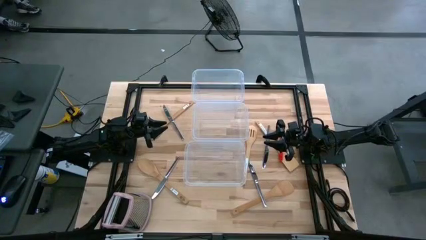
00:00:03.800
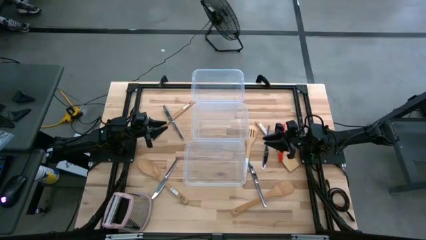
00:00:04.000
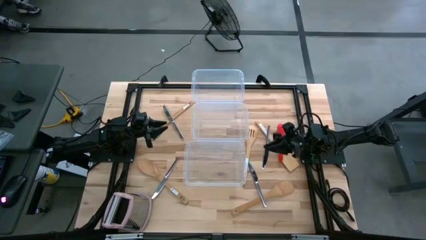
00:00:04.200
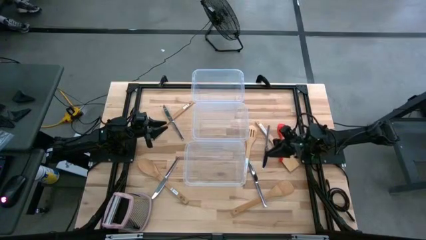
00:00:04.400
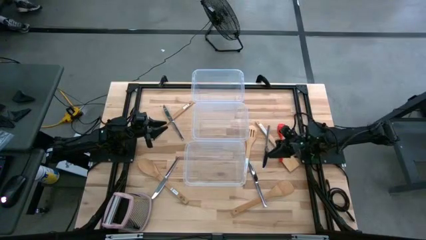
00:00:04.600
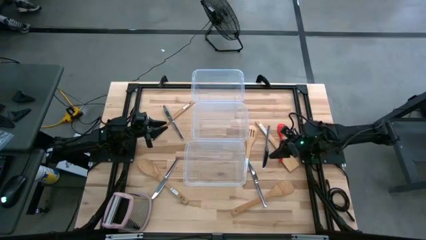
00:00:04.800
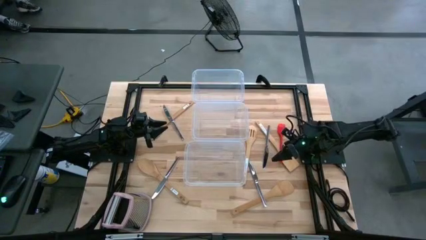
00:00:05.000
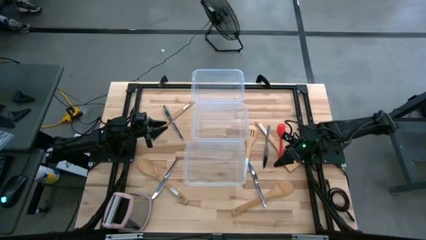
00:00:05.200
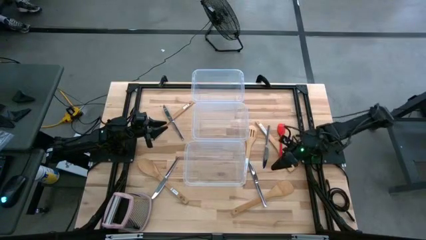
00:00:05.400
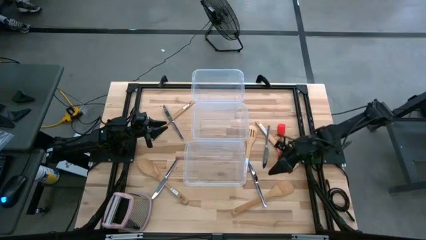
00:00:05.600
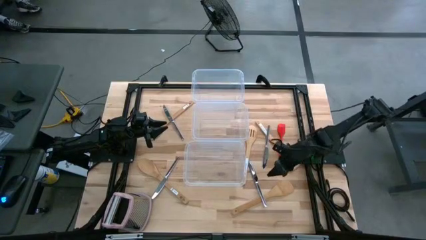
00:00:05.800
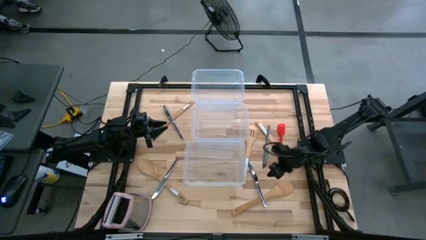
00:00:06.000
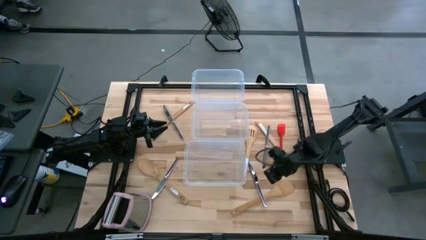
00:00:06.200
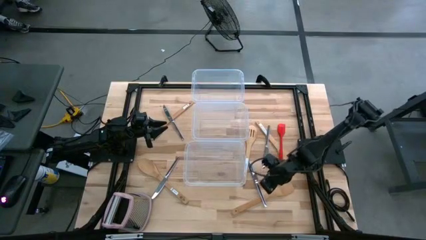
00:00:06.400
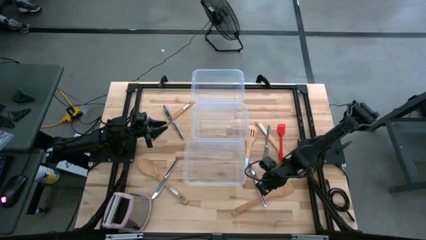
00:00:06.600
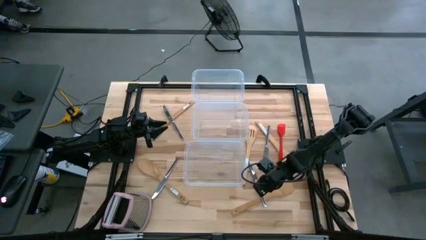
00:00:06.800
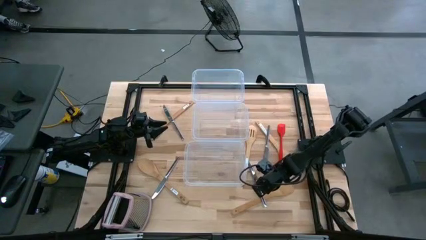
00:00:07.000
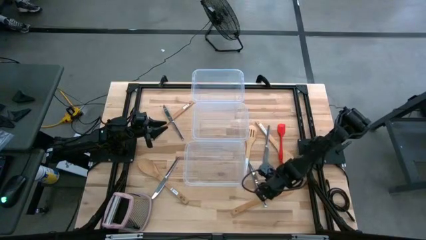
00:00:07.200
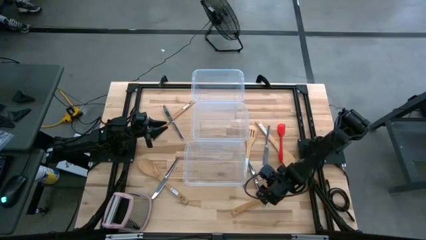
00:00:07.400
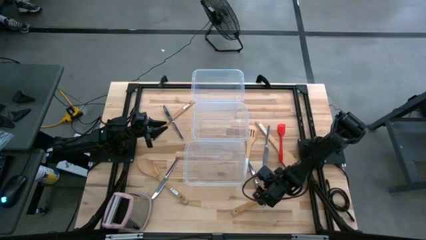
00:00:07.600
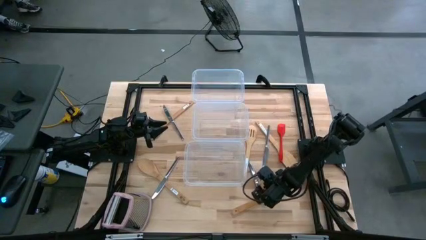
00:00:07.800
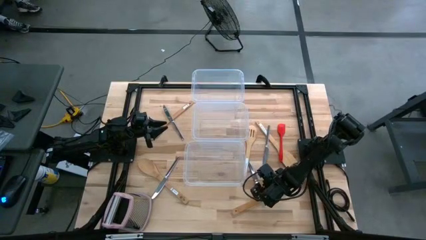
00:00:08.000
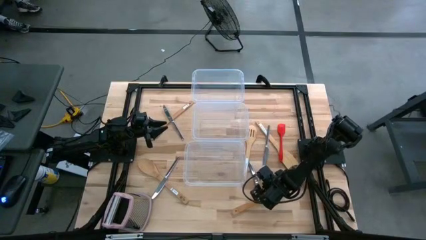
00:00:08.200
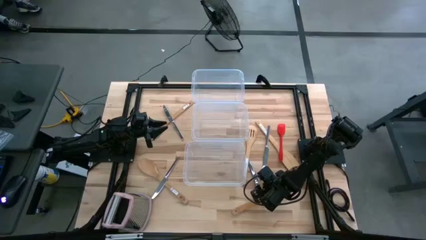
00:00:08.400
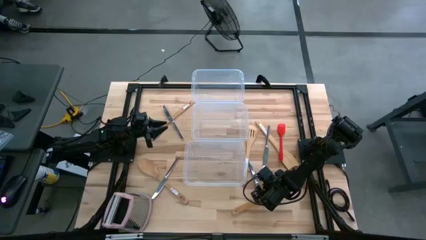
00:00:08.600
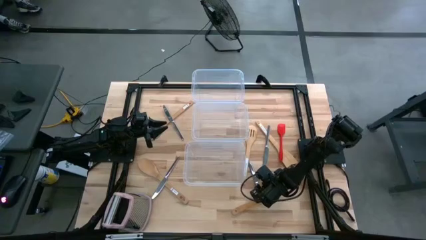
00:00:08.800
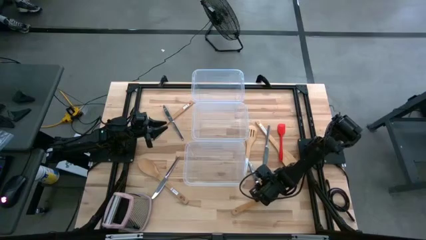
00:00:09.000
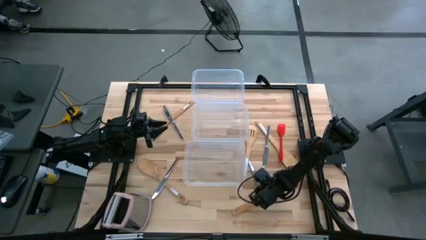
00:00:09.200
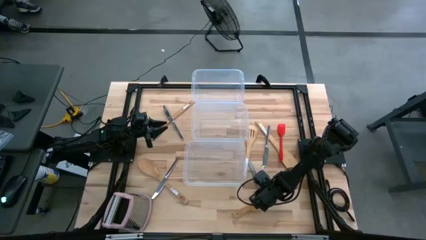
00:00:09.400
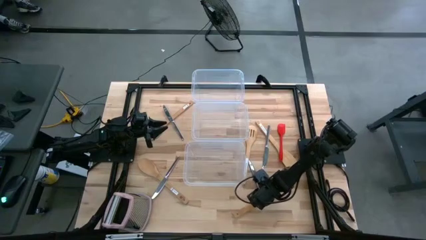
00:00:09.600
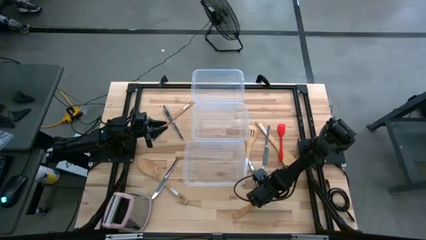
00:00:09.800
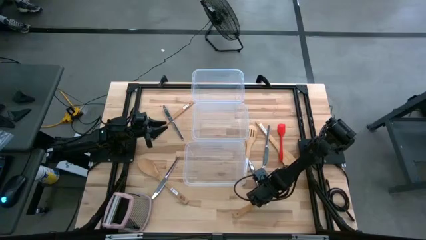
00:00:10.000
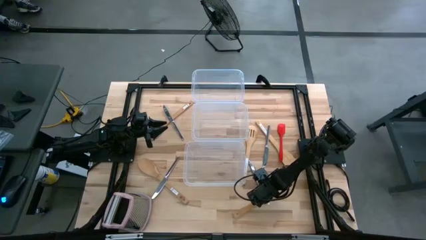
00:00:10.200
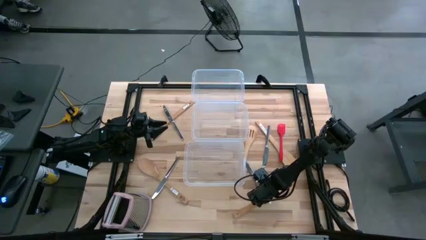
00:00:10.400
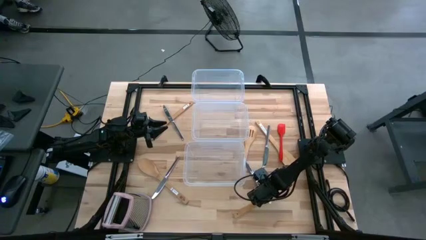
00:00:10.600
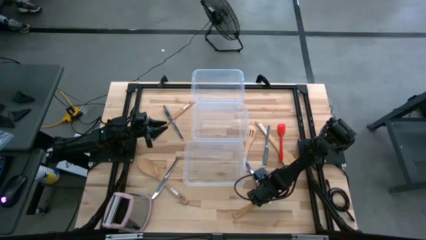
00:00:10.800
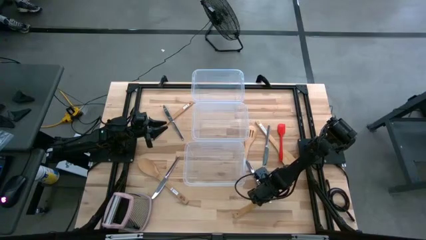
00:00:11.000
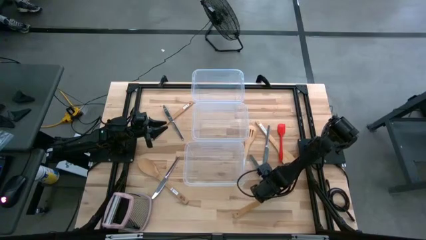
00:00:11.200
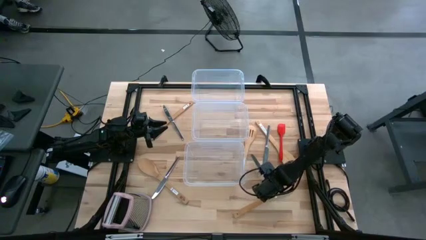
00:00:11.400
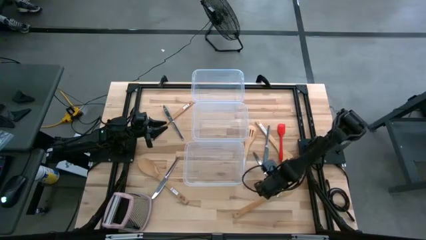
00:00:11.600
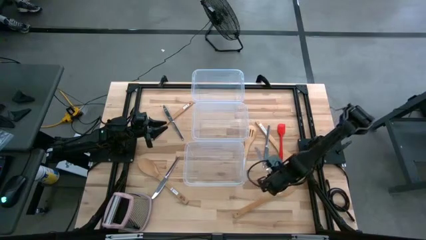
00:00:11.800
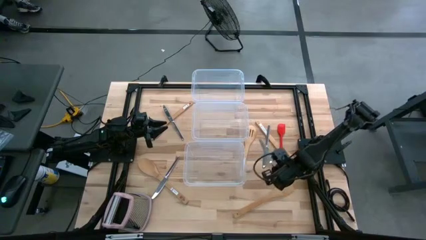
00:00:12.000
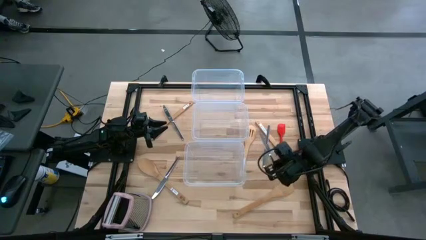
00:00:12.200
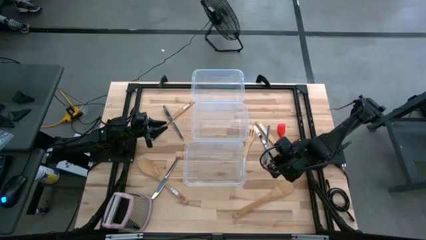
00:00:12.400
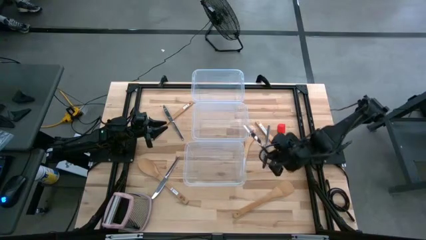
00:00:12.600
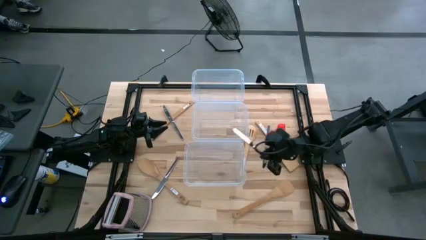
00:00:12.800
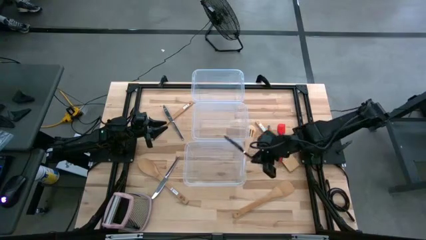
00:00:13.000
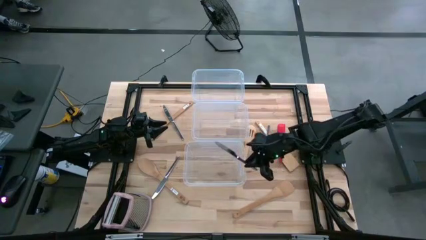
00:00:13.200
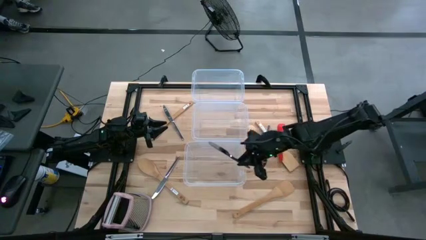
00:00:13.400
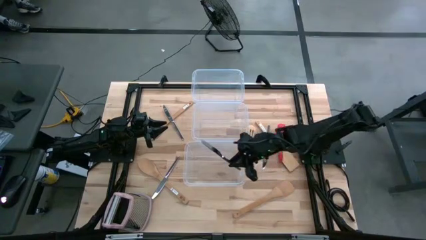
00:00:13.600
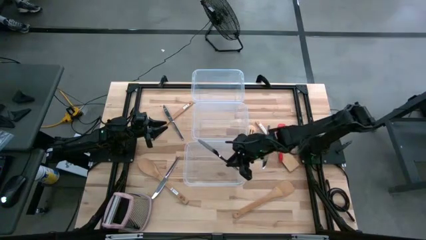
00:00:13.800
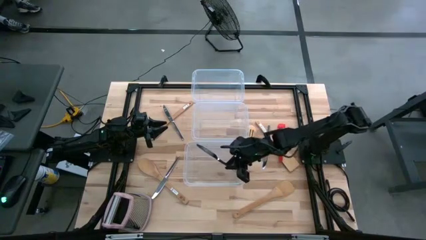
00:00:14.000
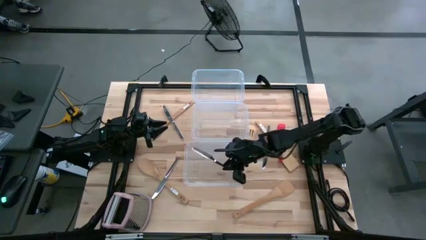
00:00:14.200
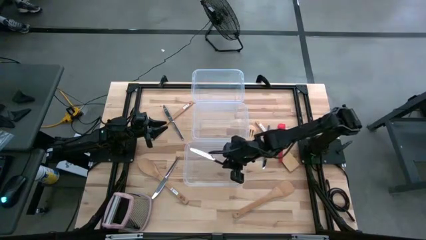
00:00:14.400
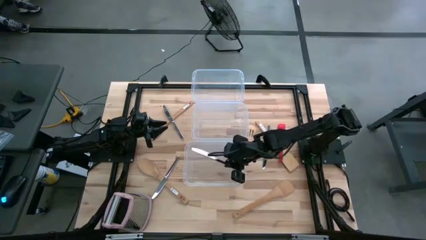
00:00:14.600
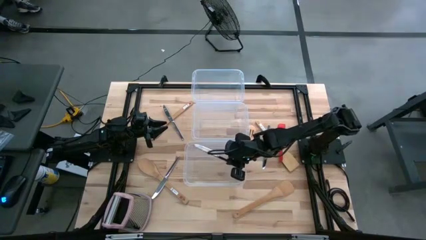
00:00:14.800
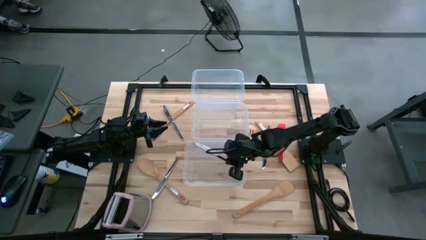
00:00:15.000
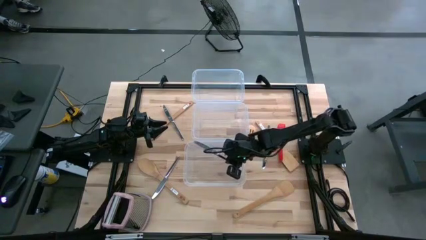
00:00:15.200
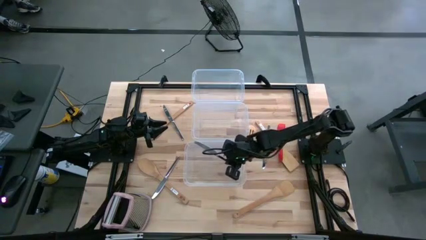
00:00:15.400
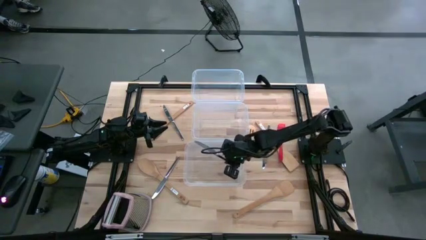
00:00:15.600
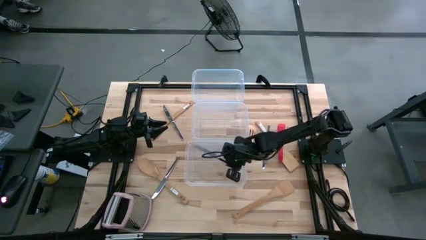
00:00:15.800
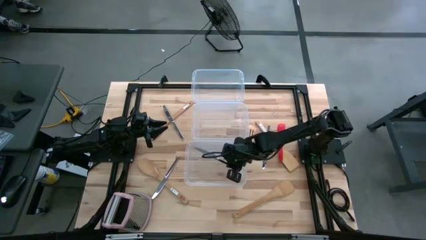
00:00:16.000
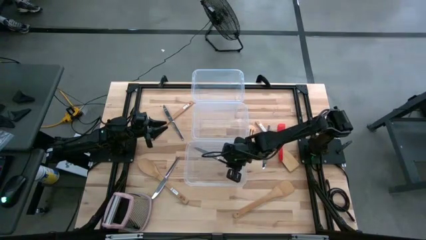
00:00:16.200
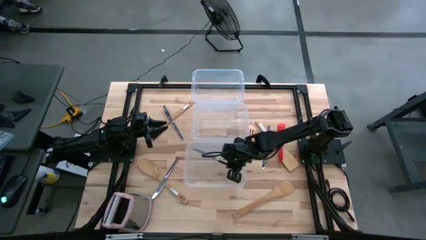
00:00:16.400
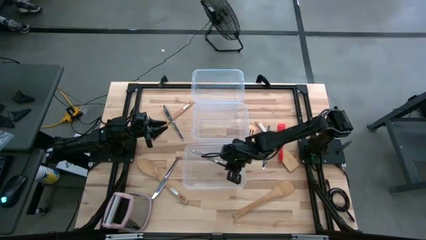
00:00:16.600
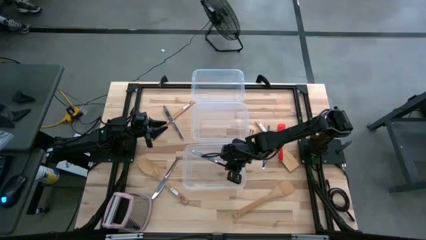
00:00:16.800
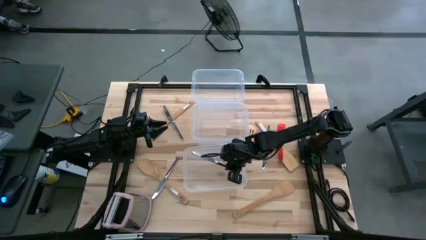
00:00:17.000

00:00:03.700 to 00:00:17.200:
Task: Pick & Place Kitchen Items
Put the silver knife into the bottom transparent bin
